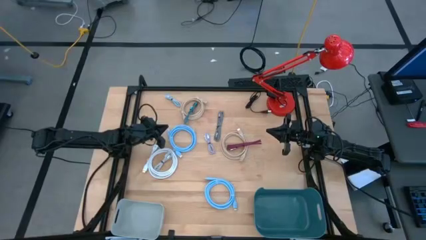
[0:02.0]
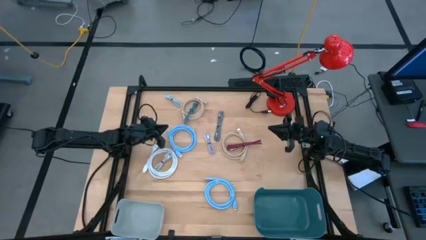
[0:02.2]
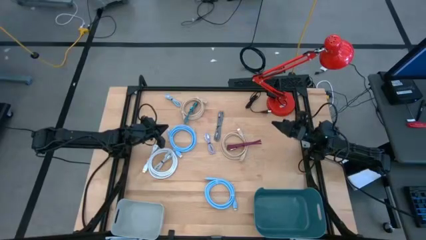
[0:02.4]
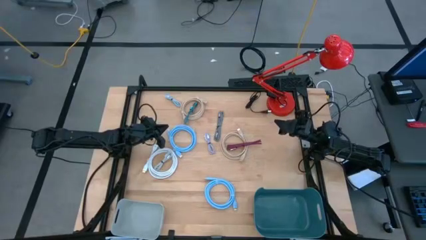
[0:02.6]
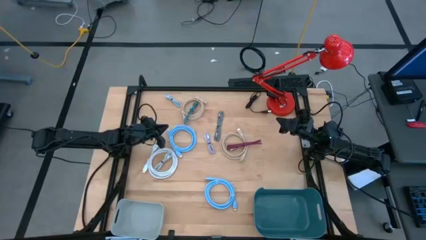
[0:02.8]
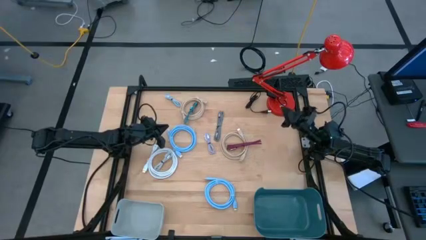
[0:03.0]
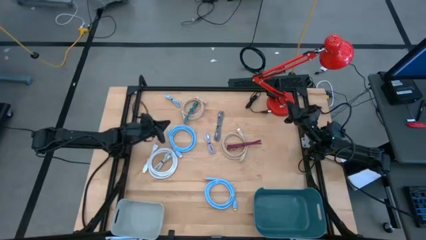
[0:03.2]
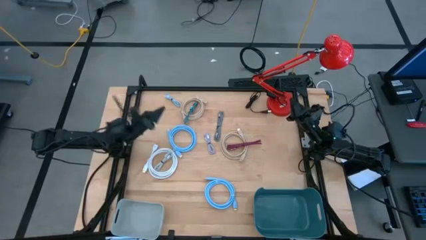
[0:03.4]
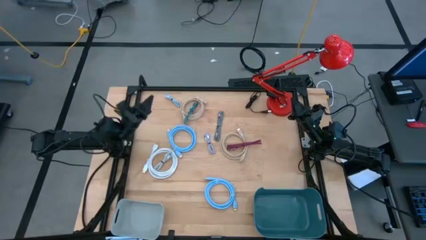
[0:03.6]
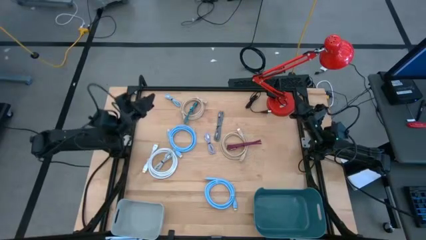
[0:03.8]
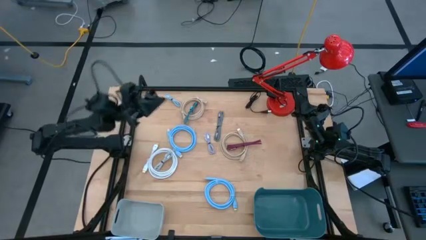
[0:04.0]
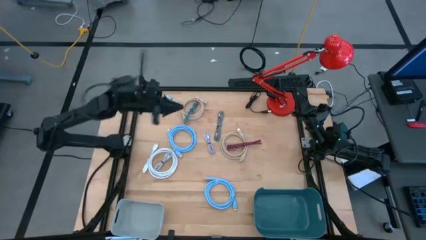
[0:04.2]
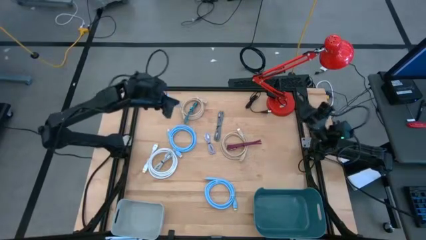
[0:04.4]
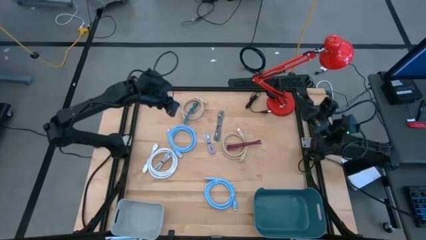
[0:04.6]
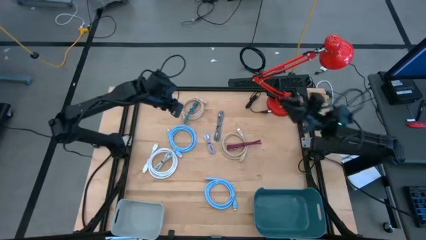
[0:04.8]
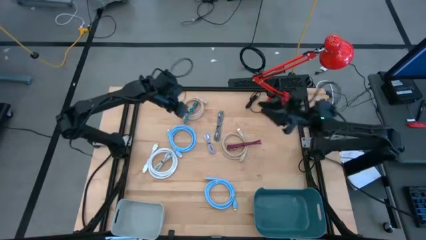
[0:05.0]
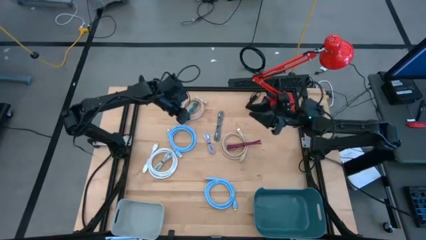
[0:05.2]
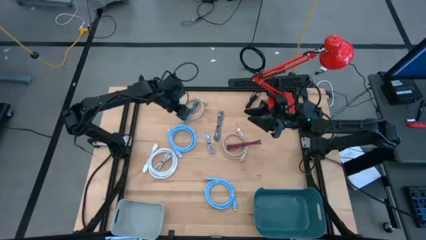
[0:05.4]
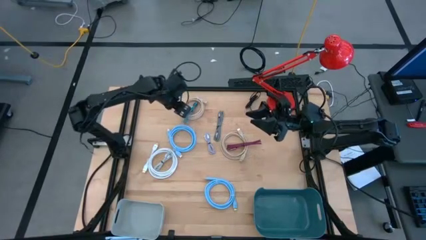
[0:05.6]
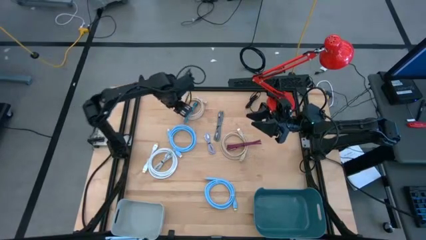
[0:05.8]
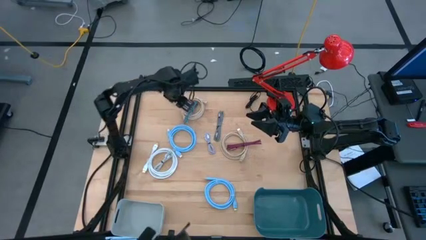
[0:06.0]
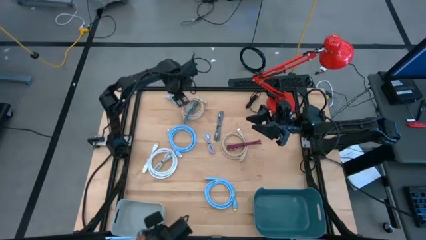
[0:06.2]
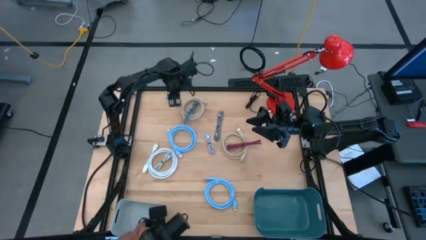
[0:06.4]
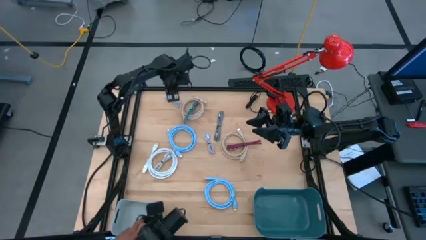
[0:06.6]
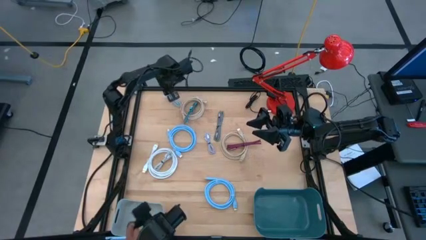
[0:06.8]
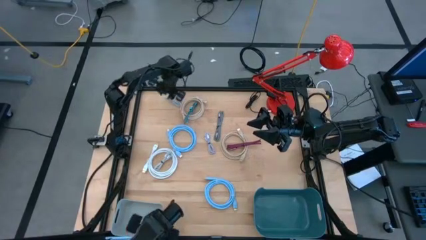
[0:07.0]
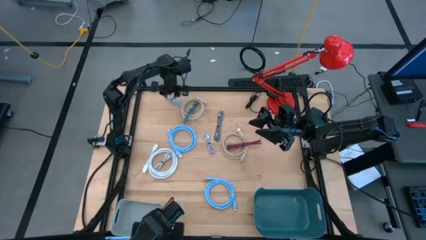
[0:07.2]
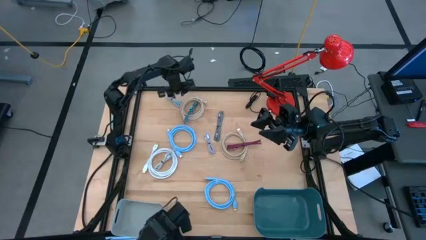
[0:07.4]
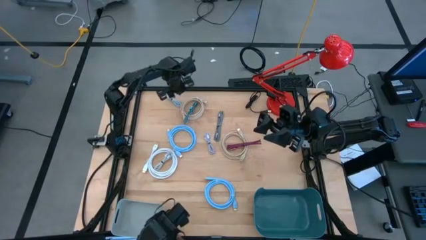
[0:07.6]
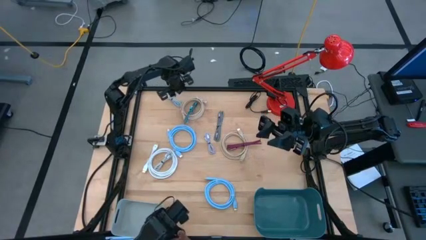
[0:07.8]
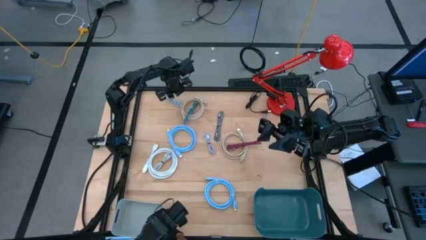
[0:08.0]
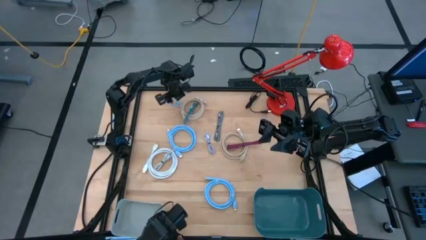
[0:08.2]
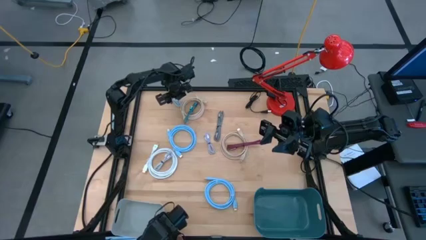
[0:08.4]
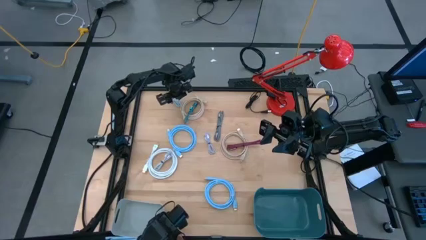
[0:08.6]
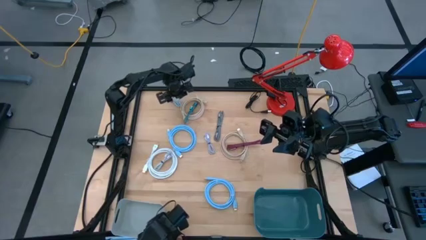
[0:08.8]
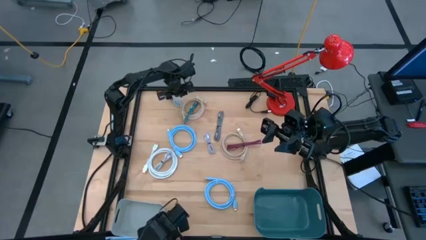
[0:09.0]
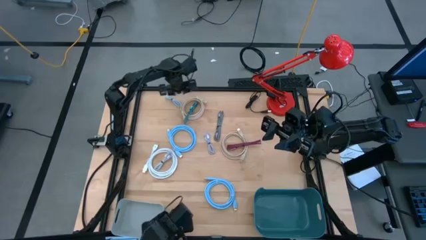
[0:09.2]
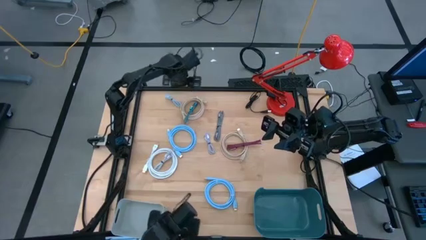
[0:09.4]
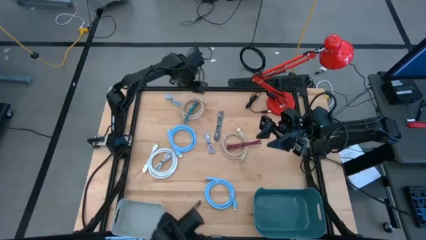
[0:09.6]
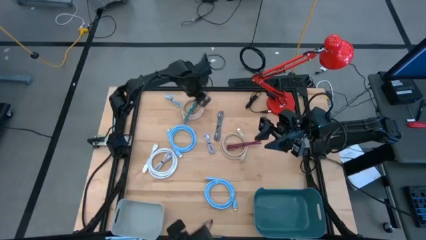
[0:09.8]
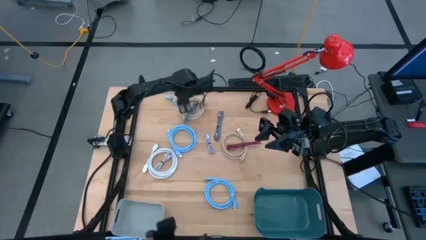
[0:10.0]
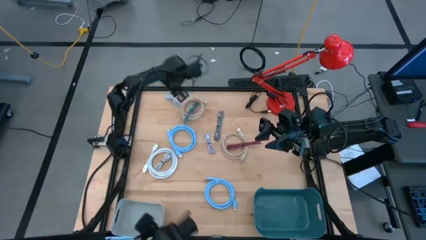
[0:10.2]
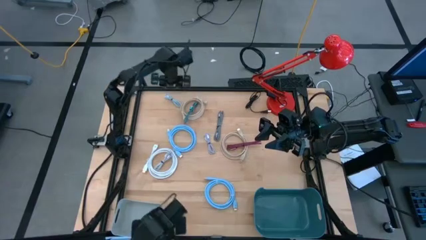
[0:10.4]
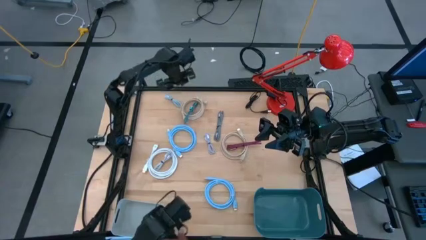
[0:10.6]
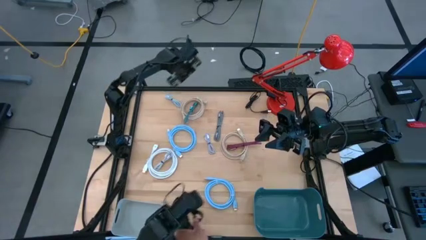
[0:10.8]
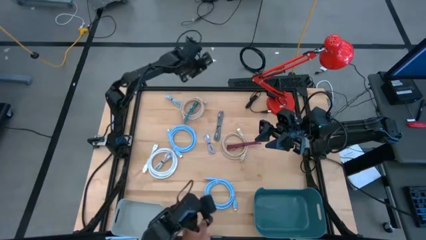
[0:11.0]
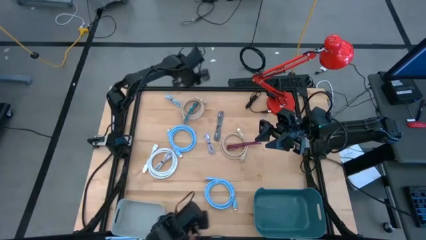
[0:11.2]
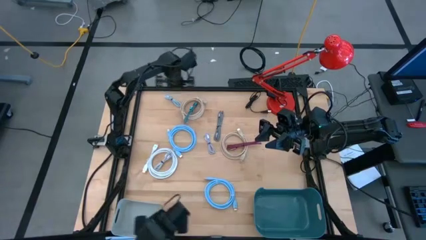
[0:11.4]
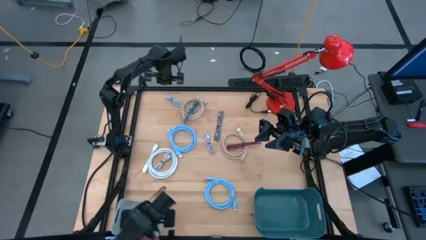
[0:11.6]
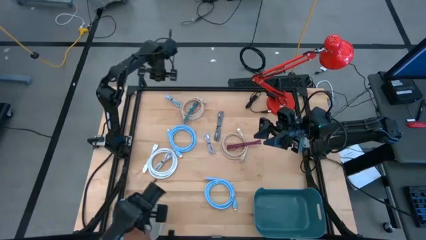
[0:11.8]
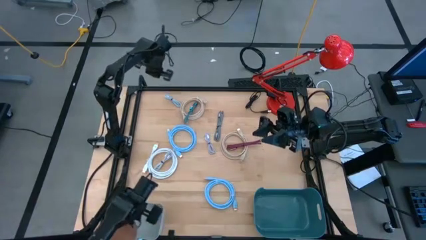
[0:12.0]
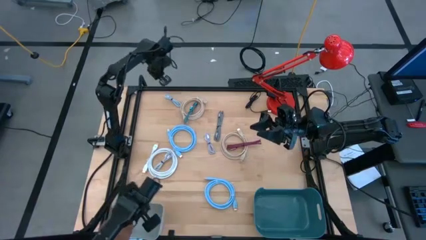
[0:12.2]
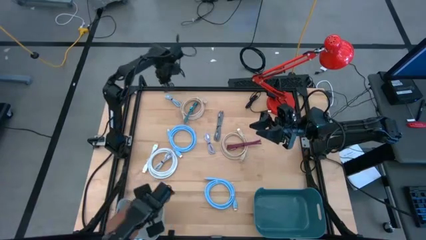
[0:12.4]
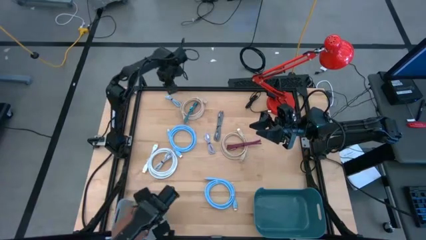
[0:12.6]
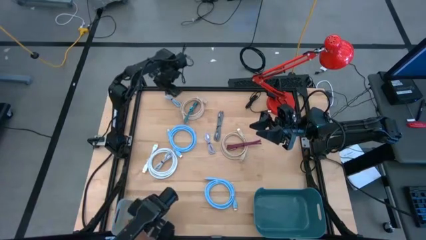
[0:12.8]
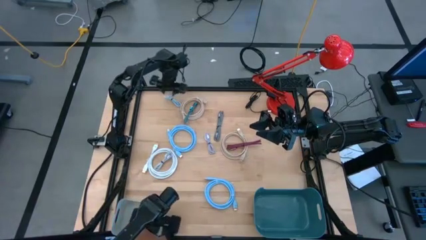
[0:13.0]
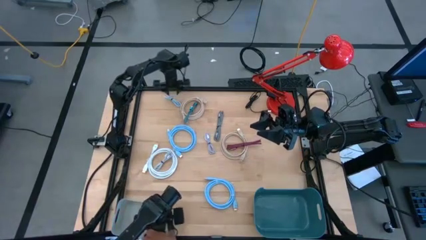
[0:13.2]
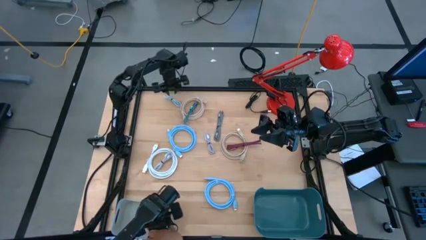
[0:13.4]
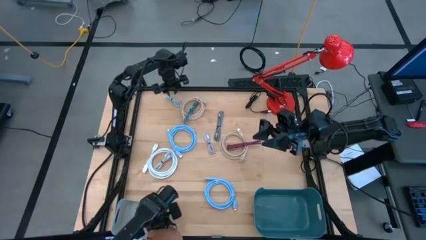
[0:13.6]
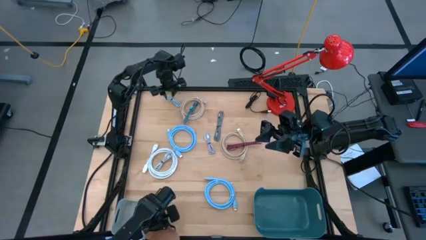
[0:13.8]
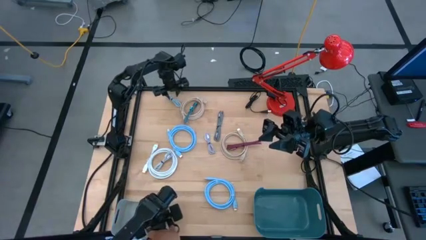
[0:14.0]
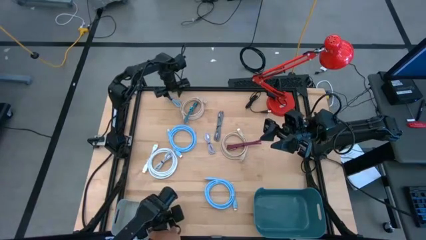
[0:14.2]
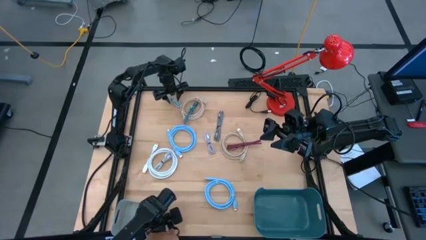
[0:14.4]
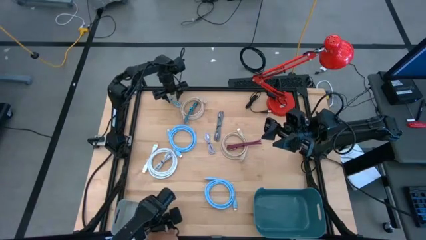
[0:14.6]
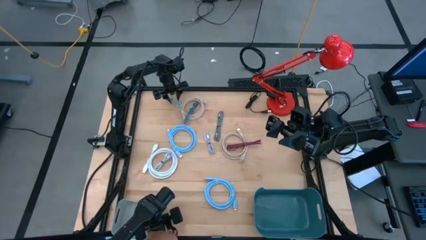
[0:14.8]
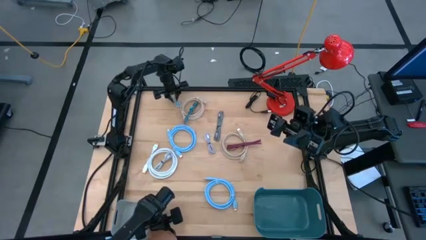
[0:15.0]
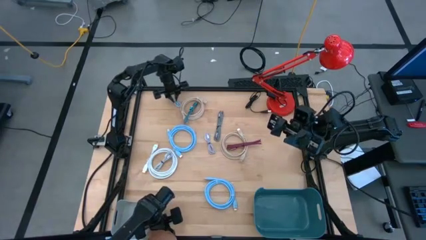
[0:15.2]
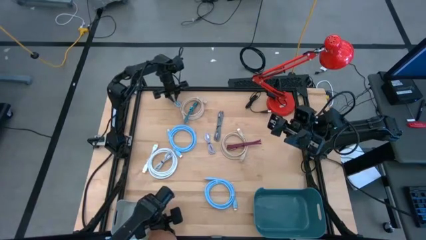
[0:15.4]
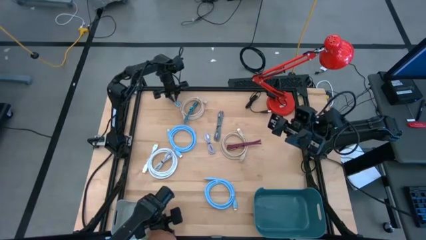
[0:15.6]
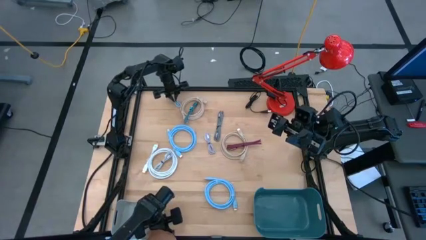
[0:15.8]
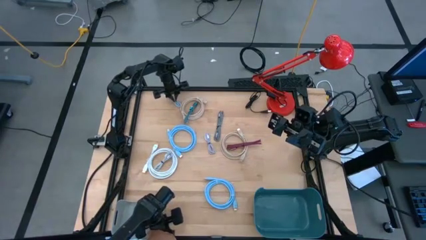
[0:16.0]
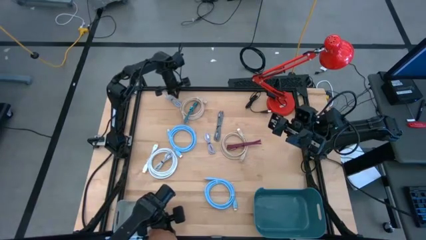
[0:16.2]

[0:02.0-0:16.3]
Task: Pick & Place USB Port
Put the blue charger cable into the gray bin
